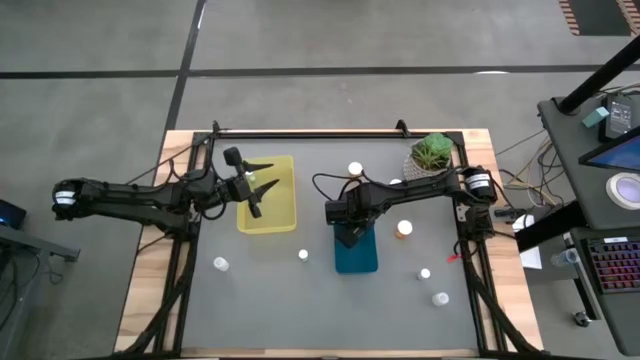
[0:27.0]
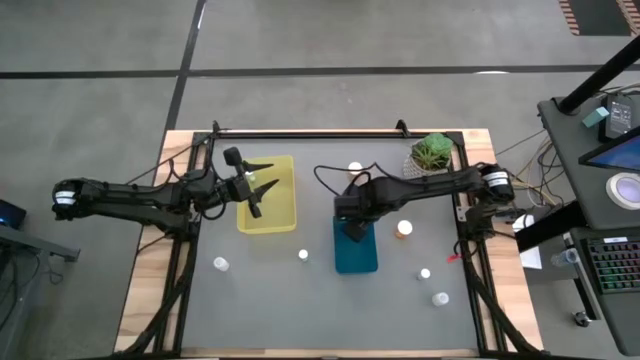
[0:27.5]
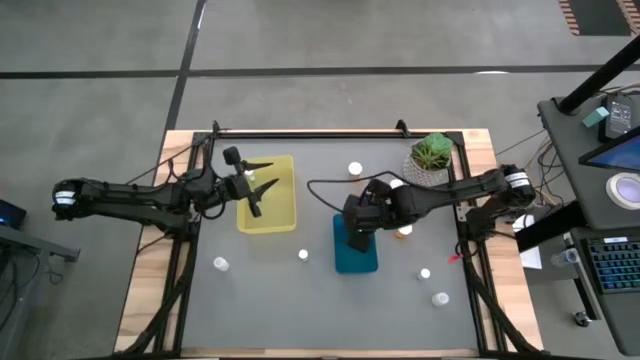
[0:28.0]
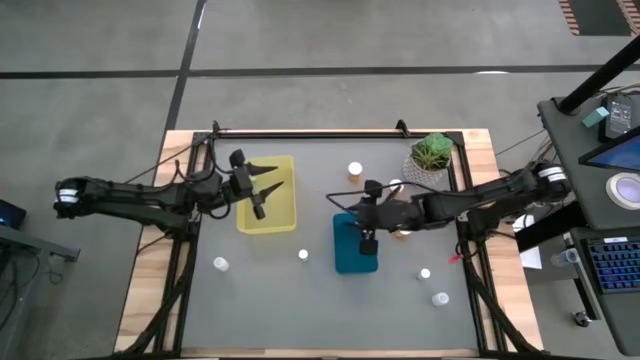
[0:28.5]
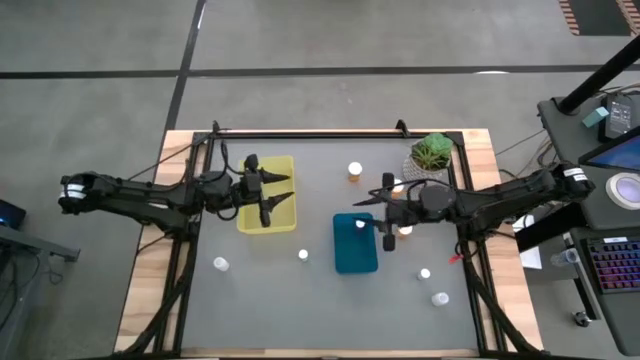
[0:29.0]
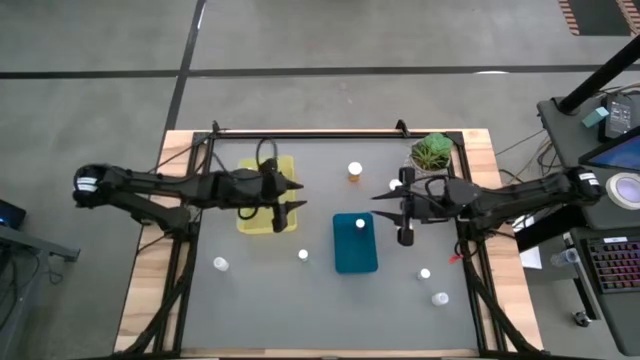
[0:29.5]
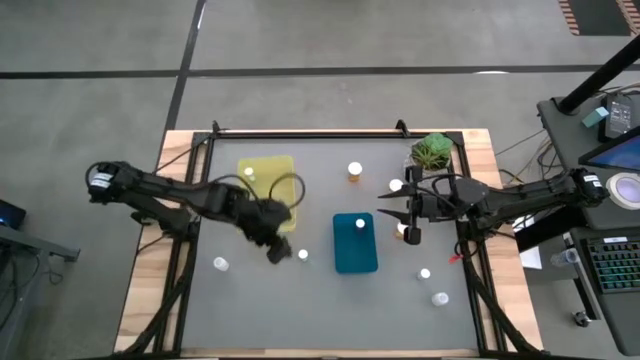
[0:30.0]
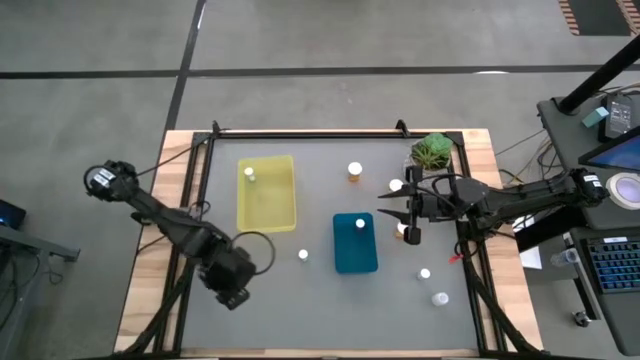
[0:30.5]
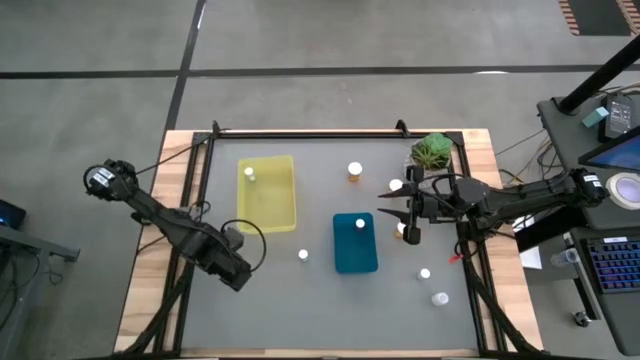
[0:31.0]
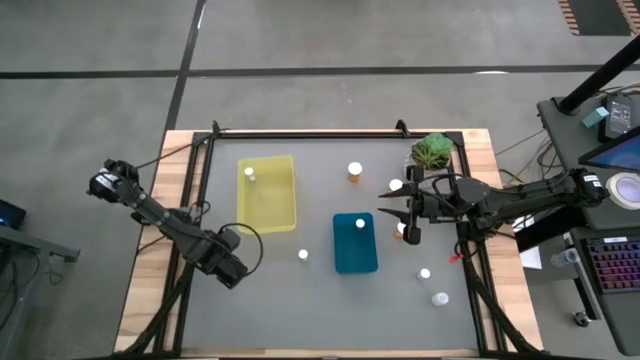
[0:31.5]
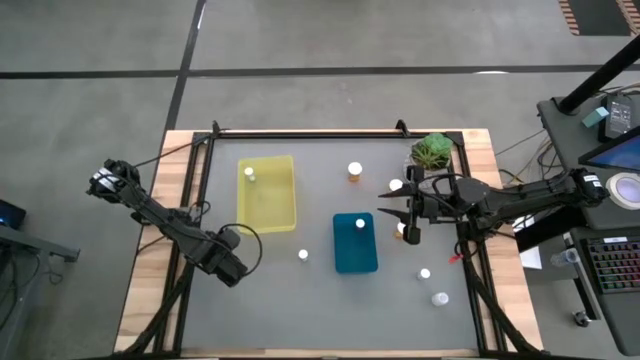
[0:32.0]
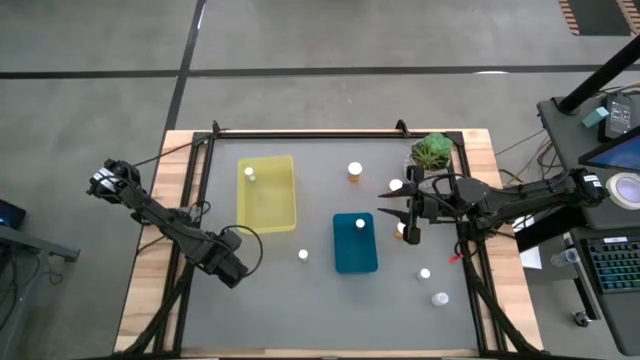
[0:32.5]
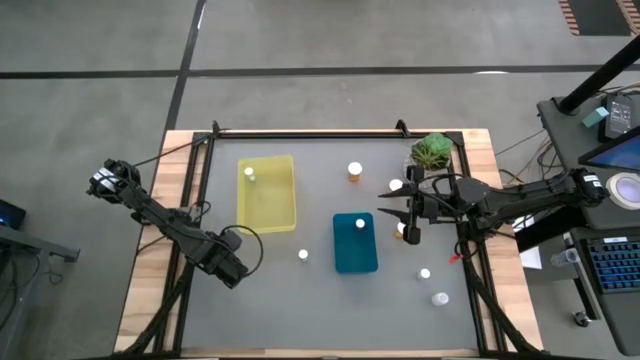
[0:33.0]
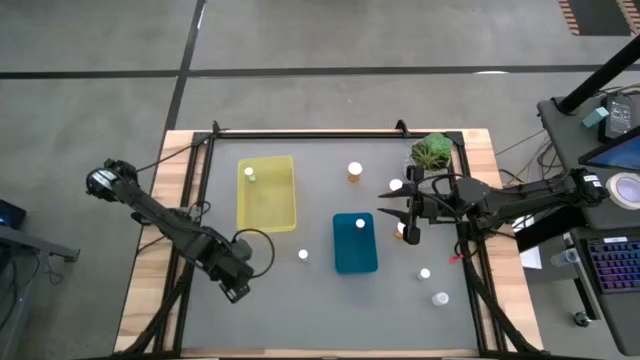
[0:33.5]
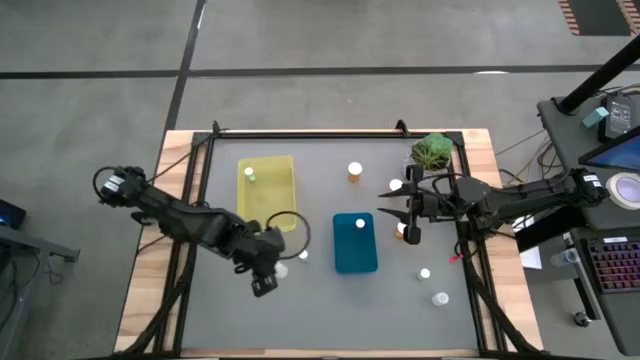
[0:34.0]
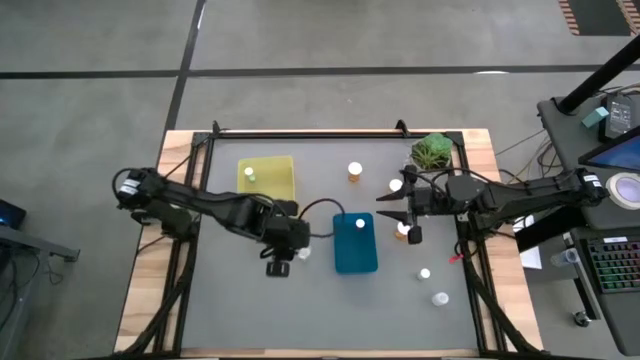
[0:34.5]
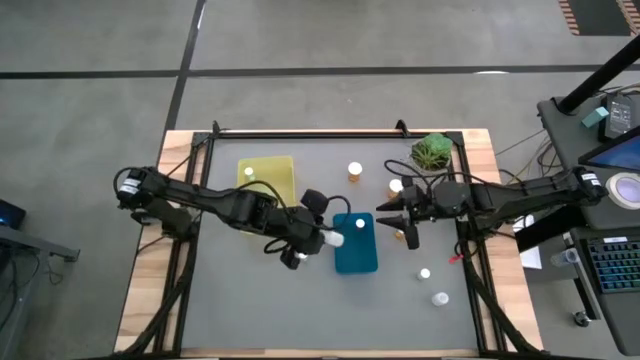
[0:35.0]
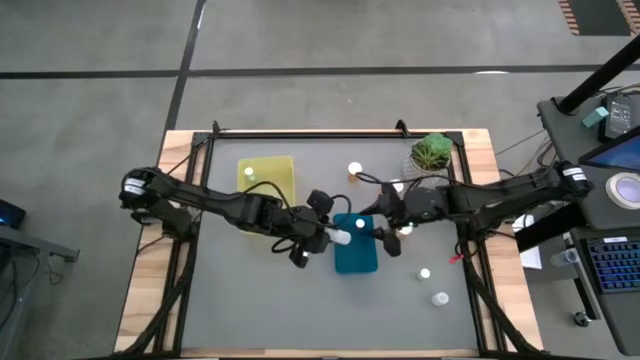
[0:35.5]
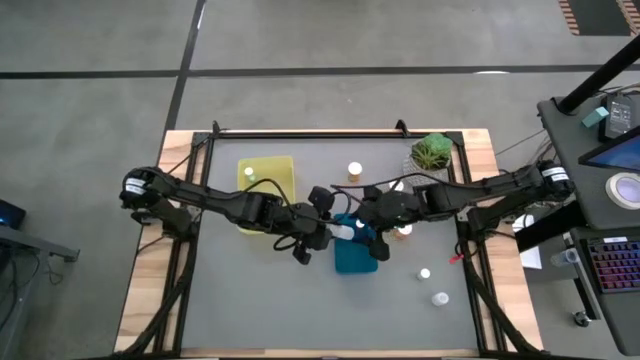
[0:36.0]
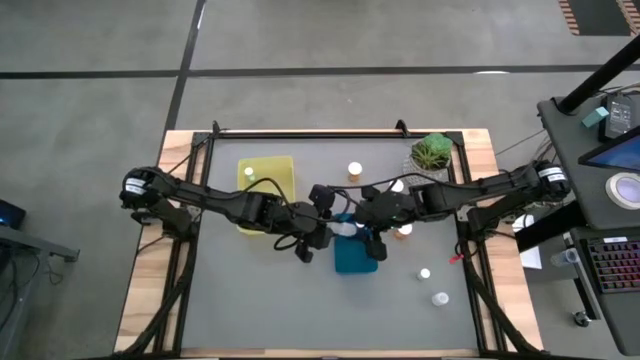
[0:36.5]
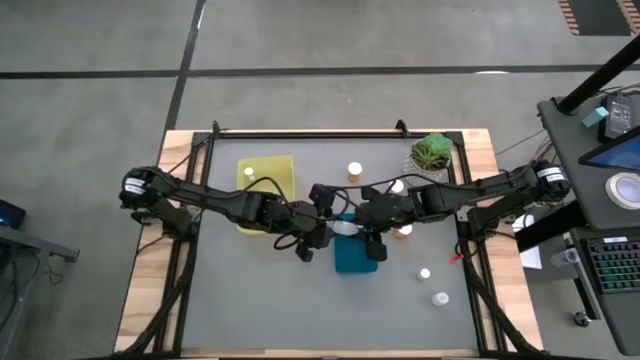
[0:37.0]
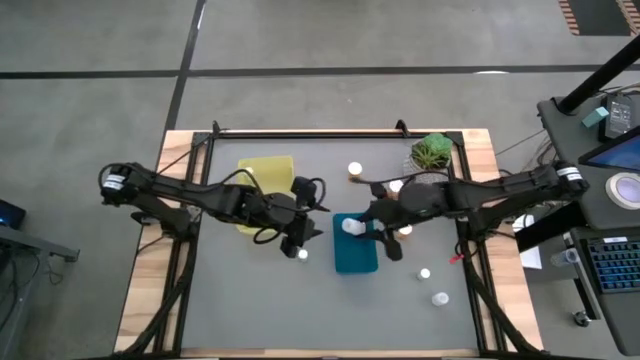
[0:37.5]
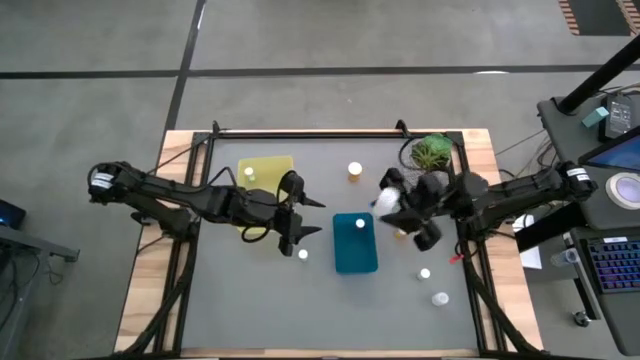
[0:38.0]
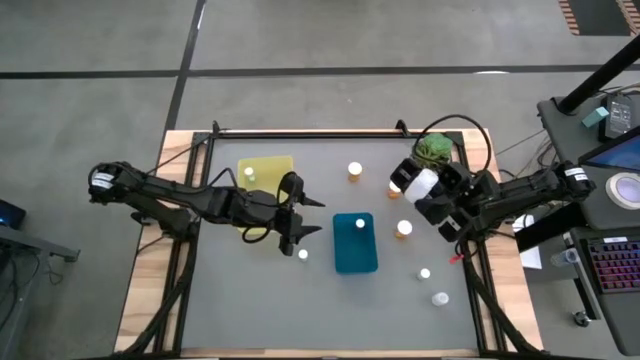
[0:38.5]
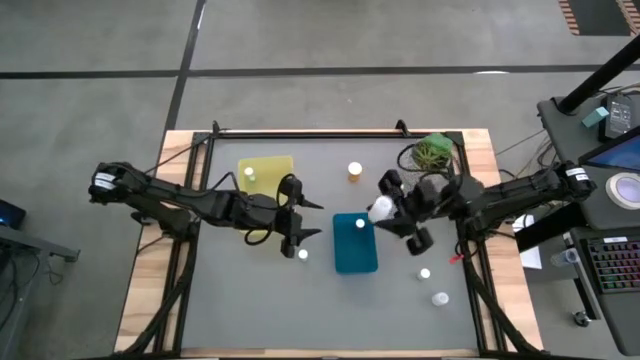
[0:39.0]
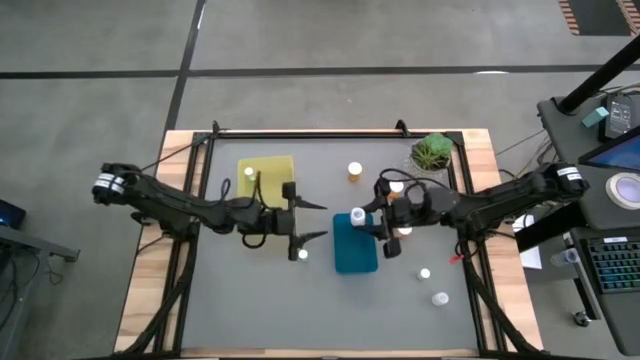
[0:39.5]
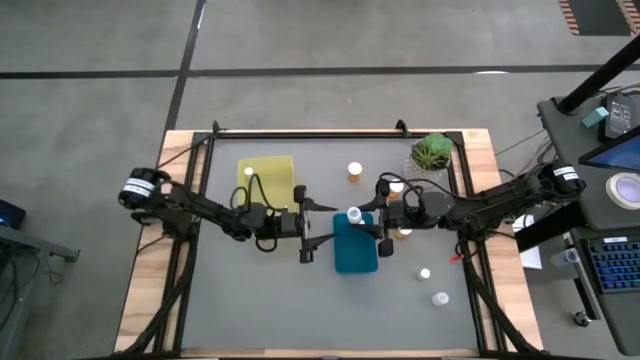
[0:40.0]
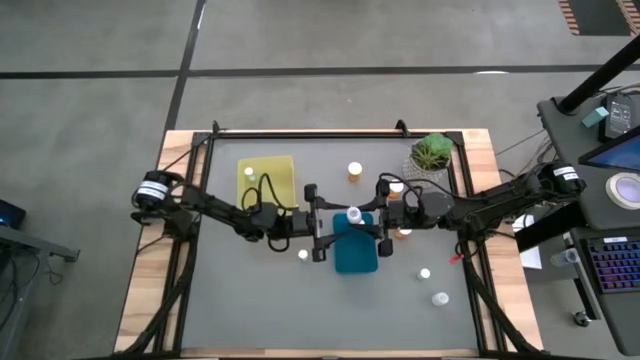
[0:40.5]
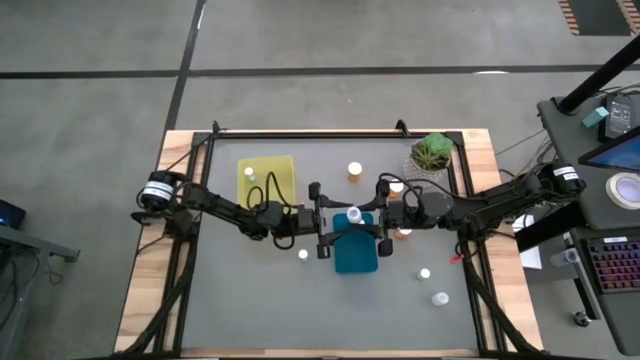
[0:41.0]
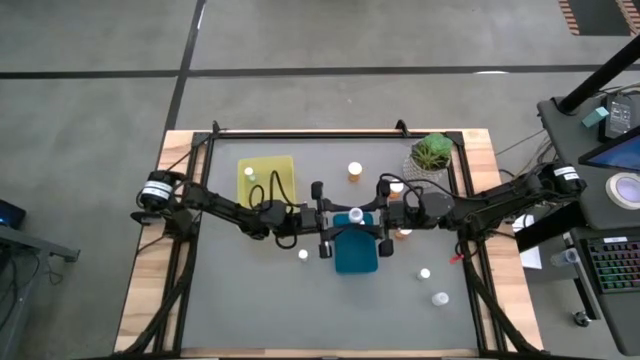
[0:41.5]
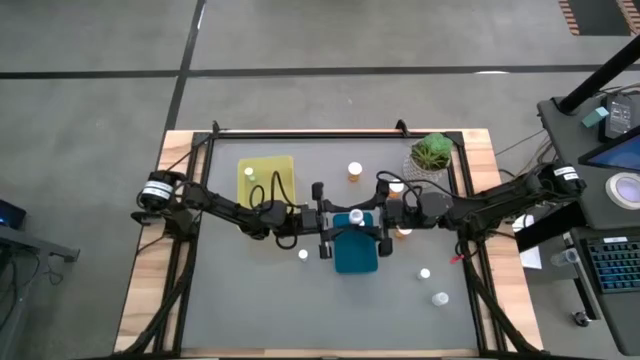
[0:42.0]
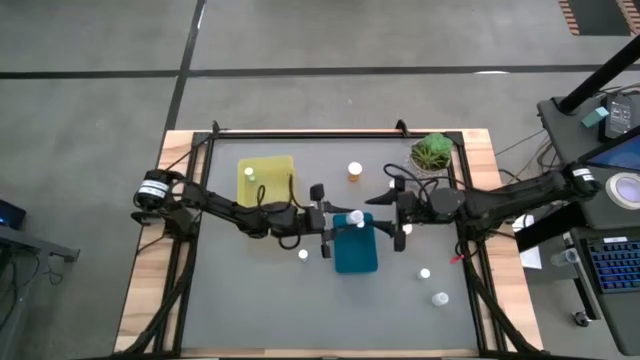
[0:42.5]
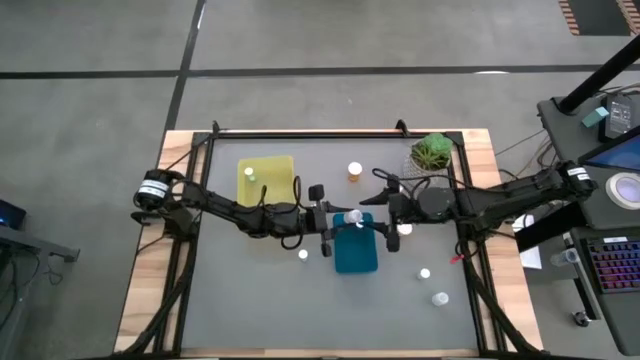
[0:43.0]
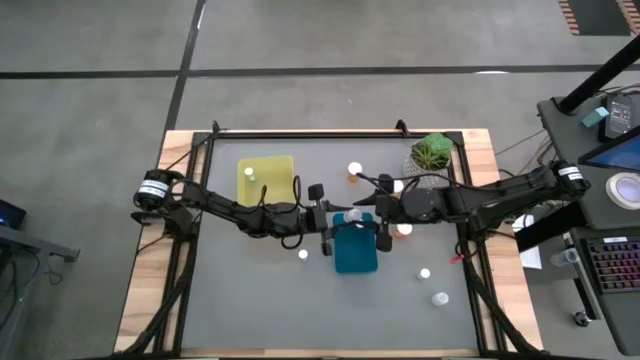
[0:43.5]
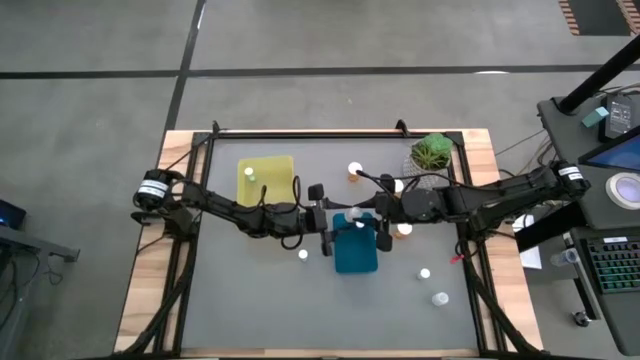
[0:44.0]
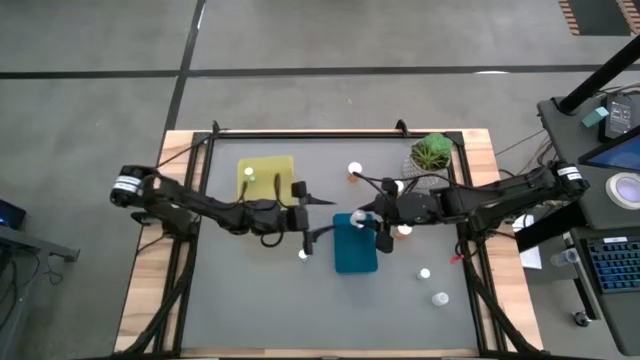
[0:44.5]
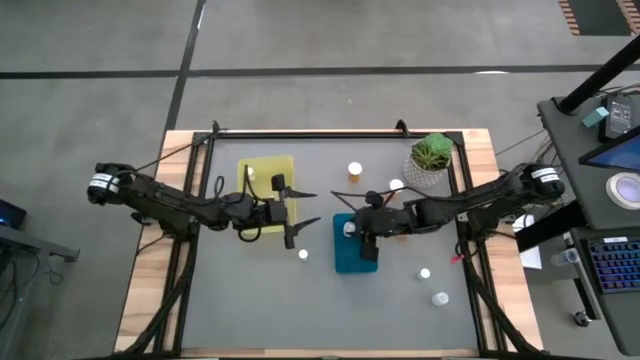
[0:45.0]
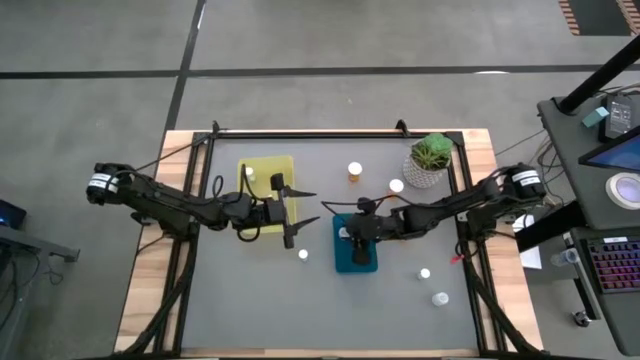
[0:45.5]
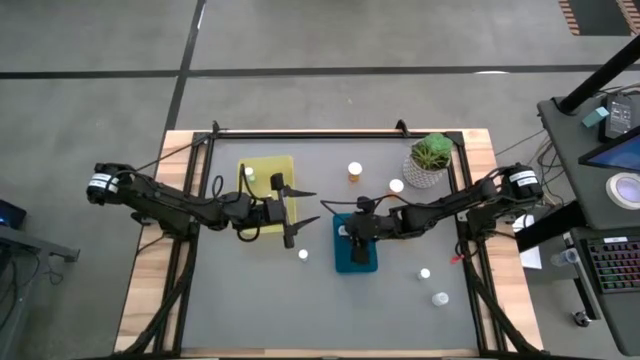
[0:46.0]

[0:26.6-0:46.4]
Task: Pick and place medicine bottles into bin by pill shape (circle, oval)
Put the left white capsule bottle into the blue bin
